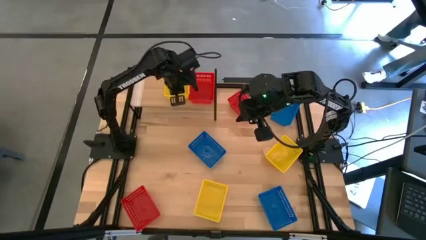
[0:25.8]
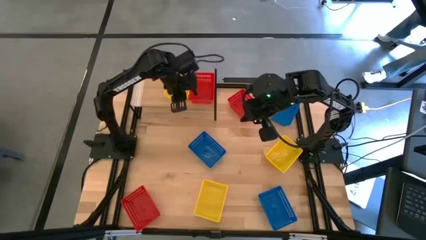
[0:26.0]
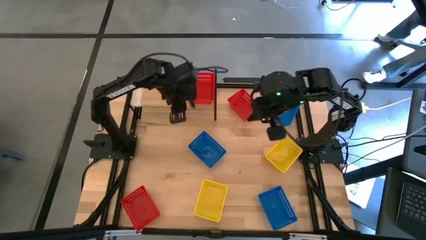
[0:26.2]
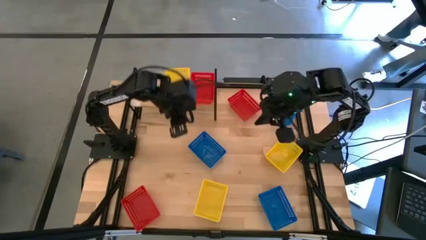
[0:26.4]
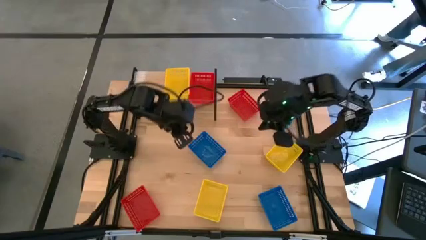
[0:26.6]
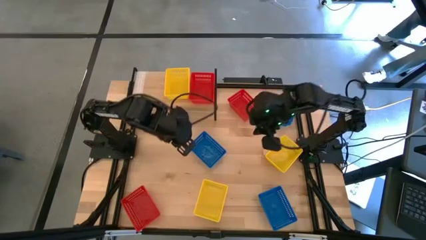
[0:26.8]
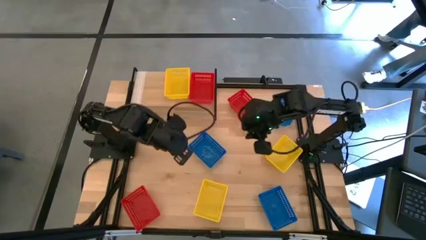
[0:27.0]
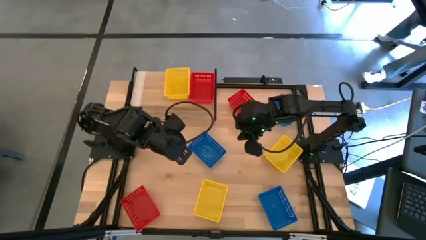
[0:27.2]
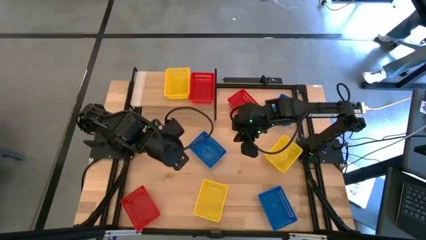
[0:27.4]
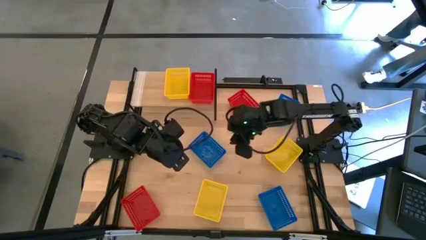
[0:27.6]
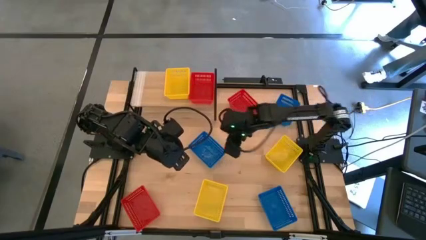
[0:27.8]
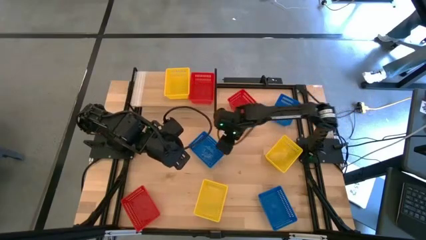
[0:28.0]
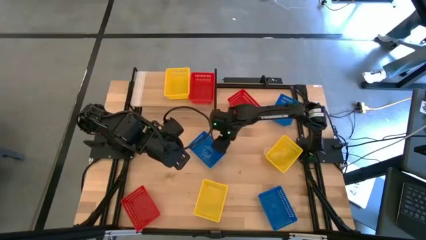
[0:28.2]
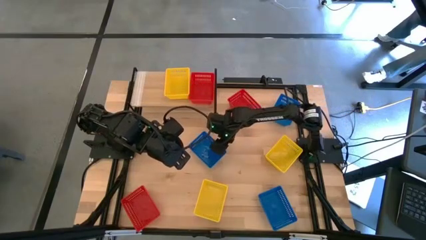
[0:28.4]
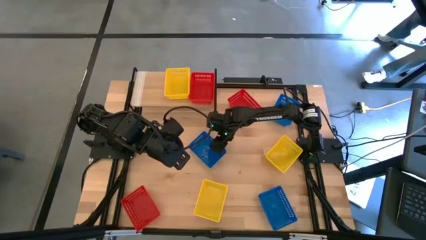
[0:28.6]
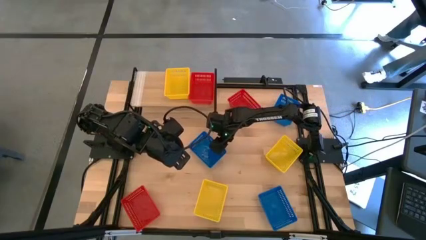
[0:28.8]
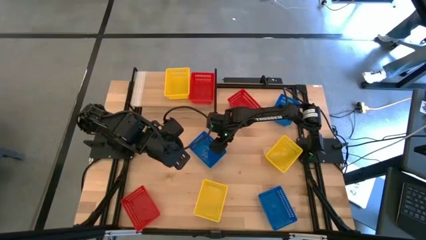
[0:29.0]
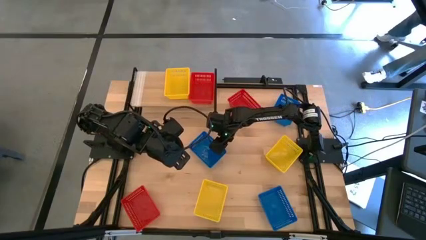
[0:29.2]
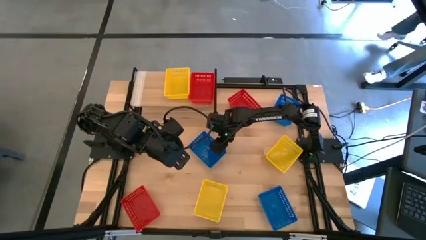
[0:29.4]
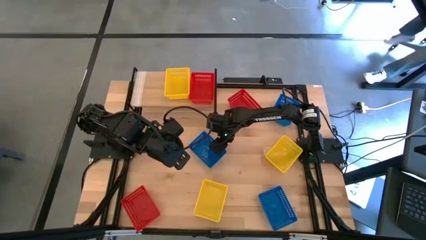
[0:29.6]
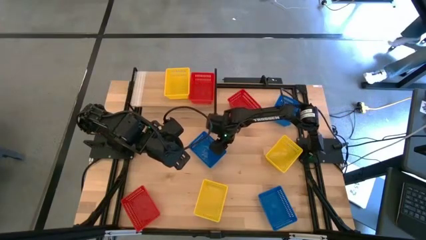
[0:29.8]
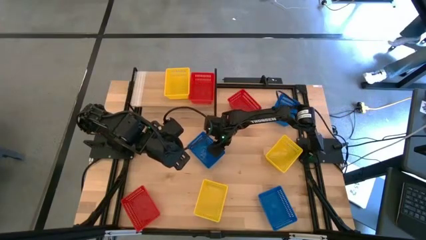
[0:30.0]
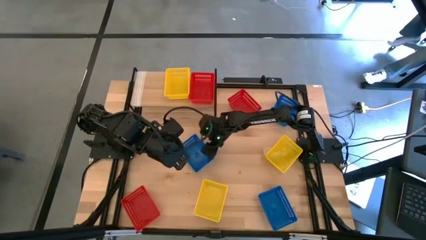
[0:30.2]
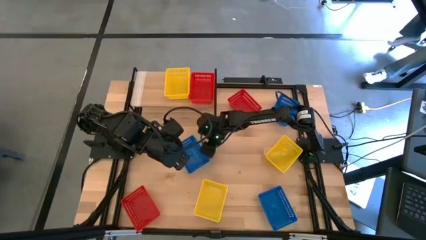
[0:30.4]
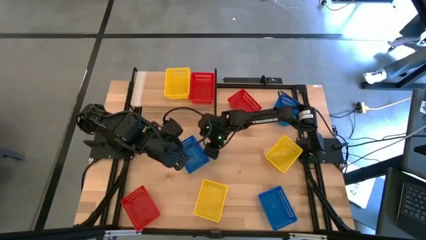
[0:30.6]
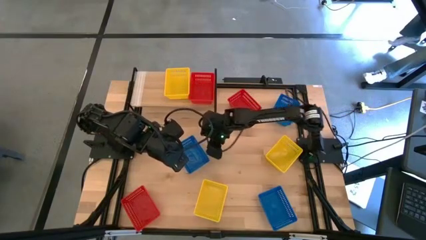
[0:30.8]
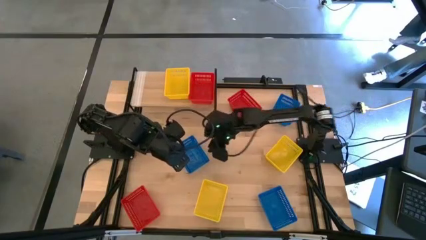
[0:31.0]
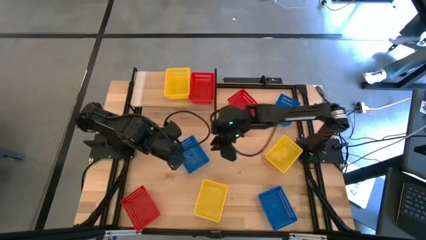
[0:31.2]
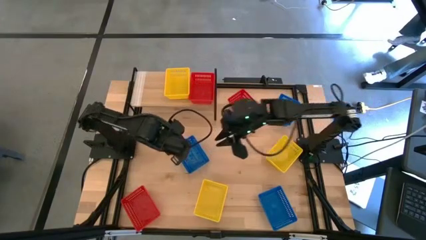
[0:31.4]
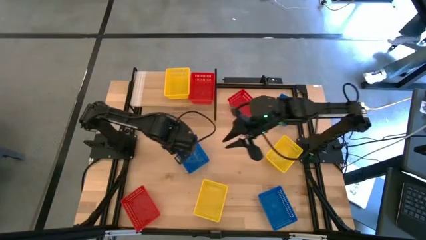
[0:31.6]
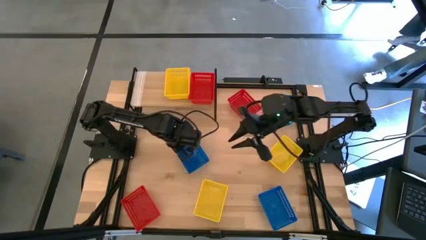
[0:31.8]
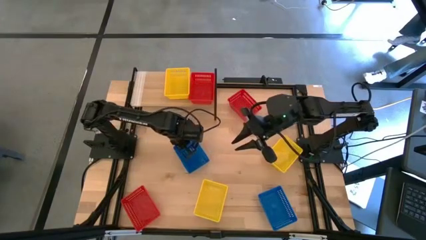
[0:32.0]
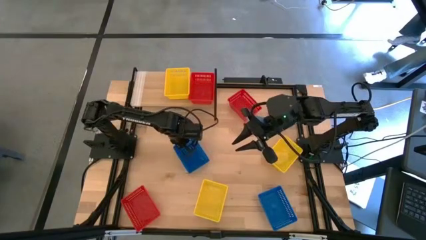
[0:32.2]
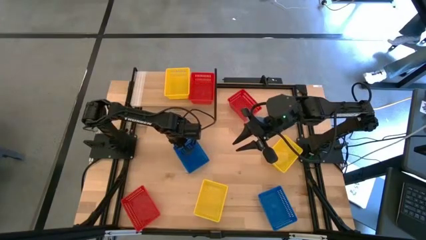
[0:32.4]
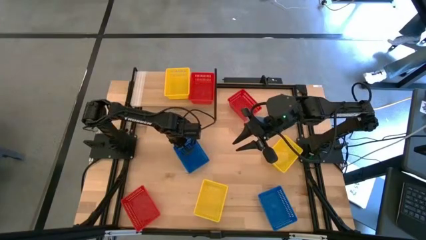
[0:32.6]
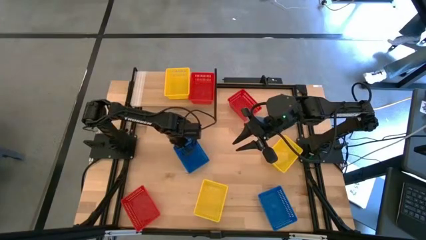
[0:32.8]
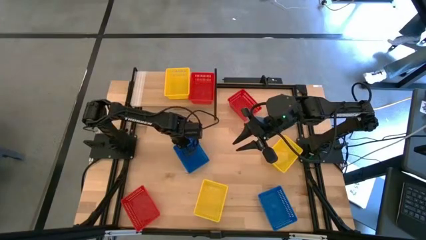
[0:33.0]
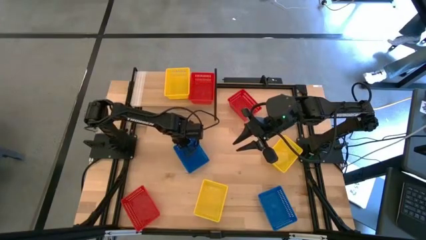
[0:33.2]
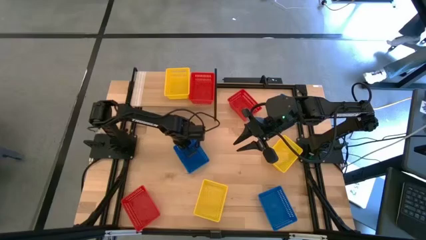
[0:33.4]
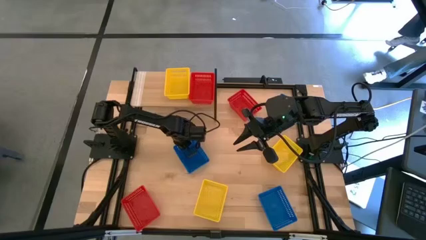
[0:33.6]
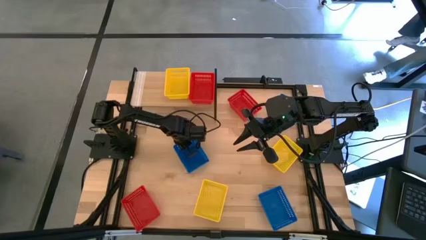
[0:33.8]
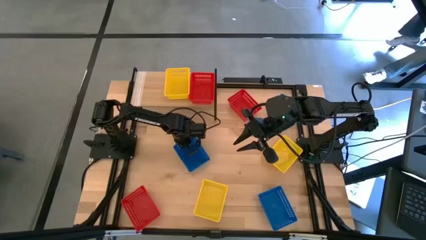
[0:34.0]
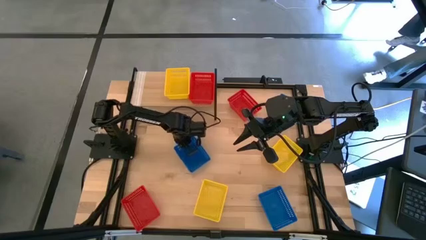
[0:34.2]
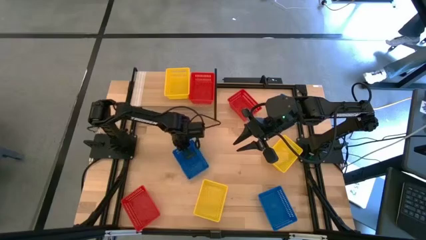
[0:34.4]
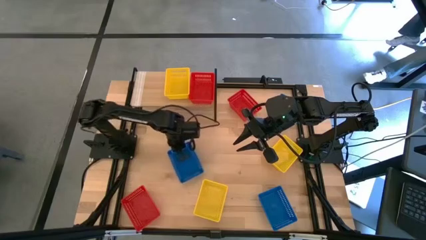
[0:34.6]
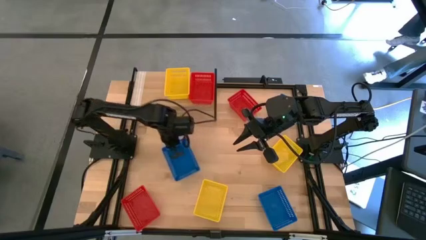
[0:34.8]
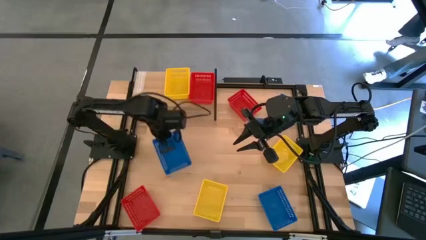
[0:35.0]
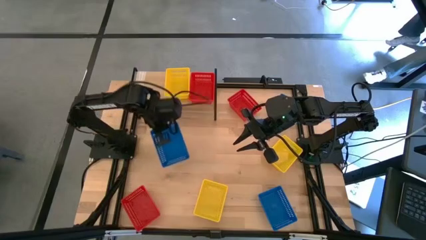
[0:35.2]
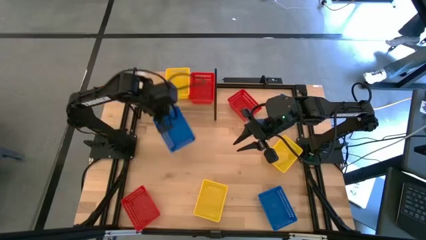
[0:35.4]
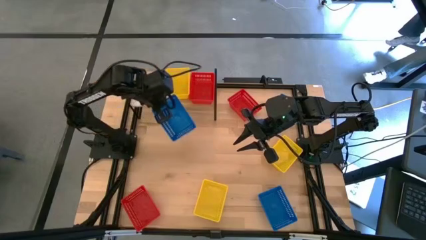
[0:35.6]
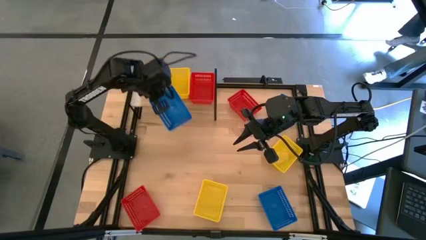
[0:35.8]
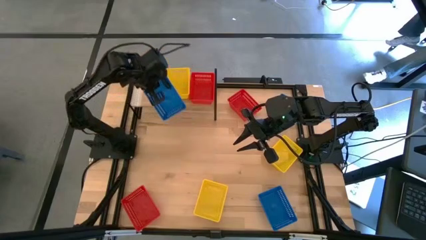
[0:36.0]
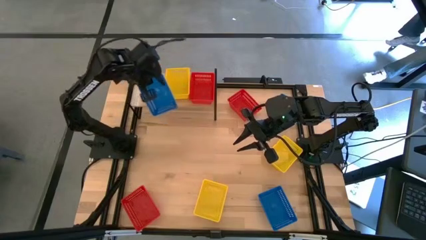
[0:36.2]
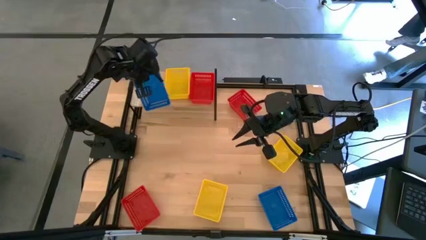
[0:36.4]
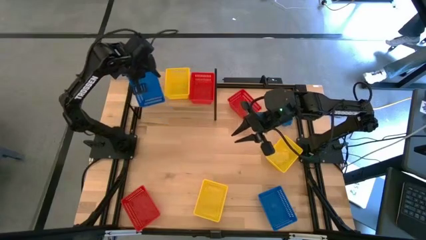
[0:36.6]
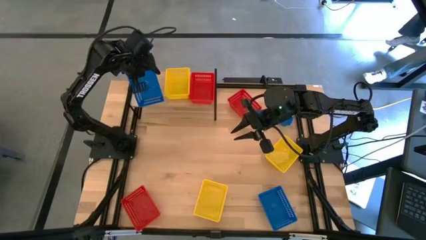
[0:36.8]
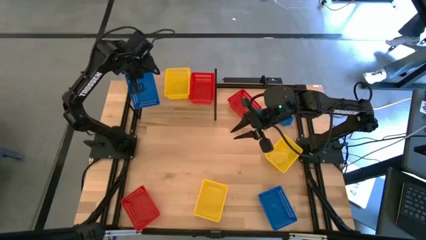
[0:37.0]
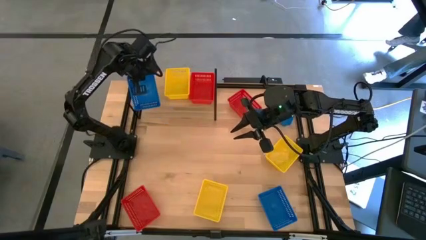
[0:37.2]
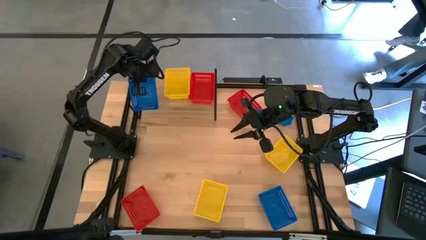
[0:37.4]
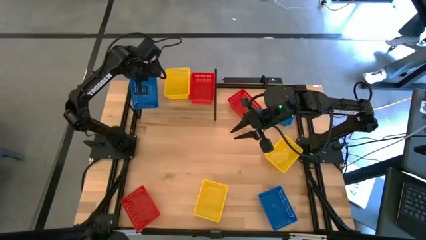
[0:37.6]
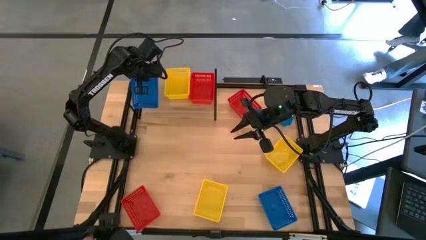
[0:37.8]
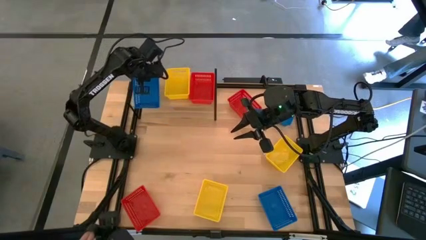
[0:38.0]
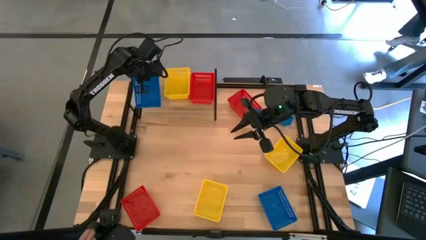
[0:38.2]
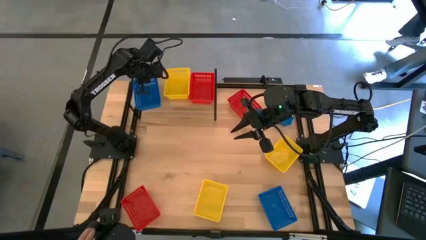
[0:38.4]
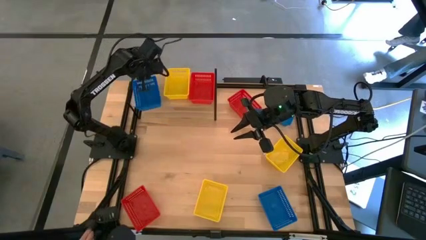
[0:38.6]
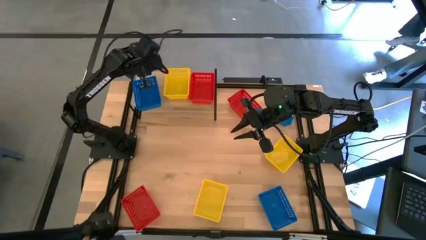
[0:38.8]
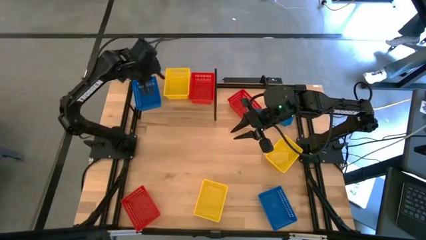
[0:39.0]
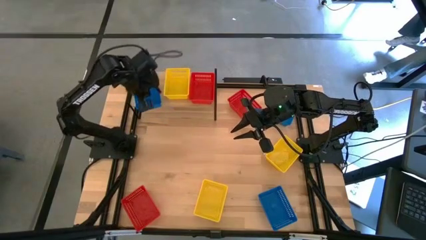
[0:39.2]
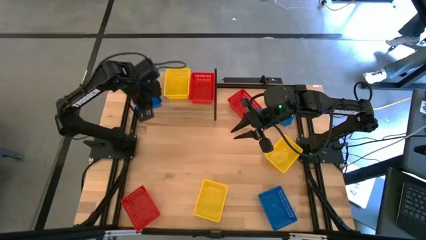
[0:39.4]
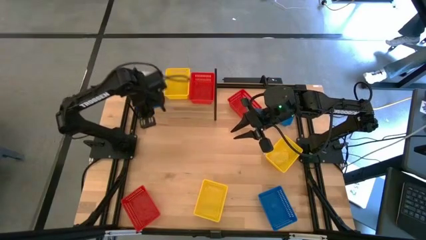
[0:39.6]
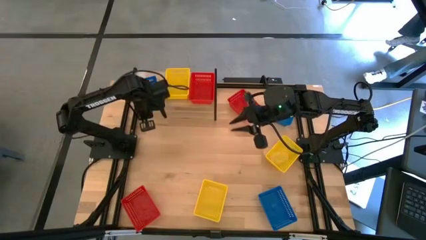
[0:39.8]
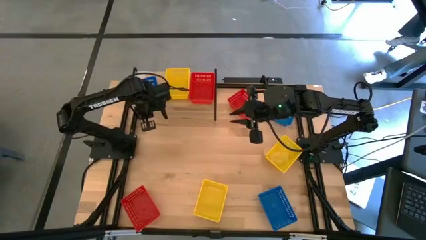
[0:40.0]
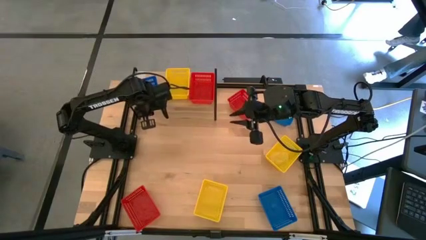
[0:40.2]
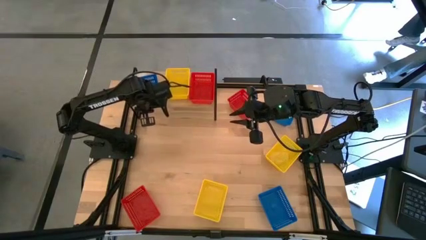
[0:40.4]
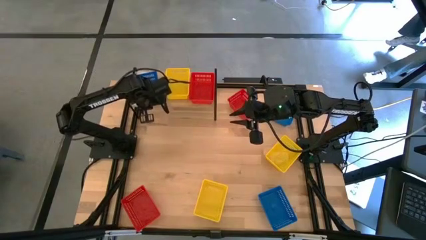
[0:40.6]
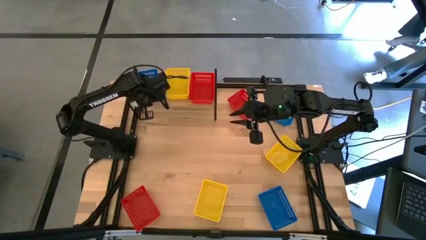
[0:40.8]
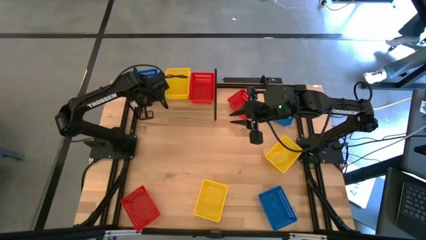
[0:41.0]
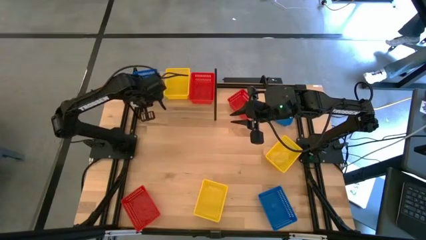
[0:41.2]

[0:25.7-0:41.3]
Task: Stack baskets on shelf by color
Put the middle blue bin on the shelf
